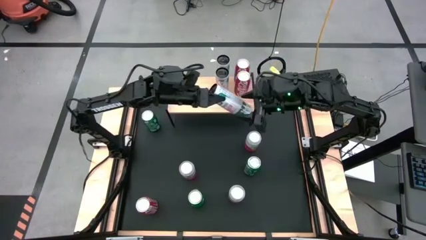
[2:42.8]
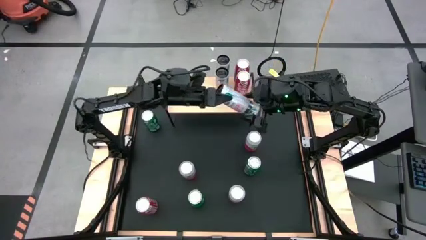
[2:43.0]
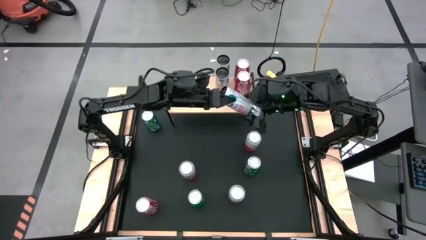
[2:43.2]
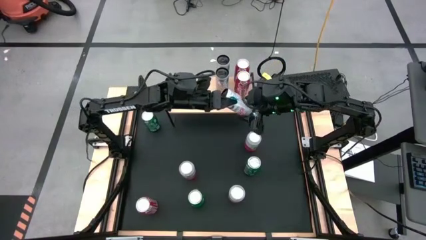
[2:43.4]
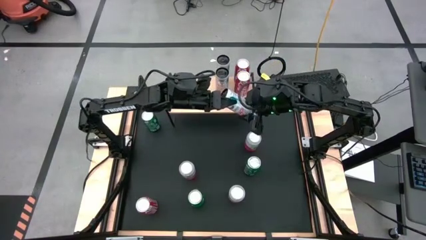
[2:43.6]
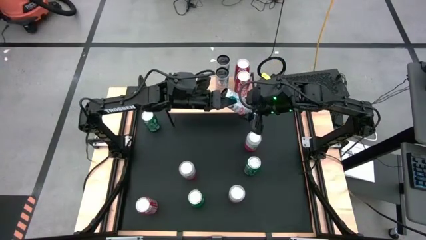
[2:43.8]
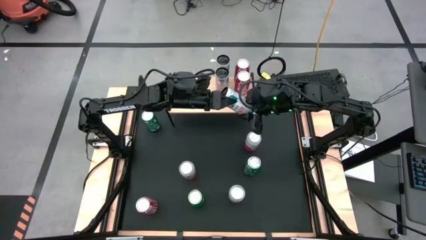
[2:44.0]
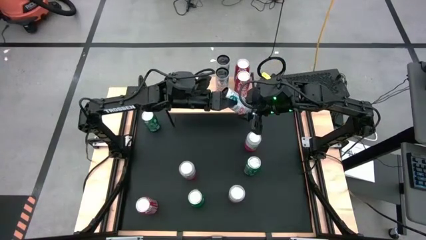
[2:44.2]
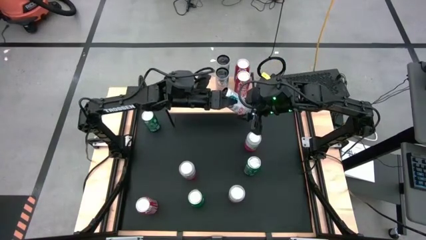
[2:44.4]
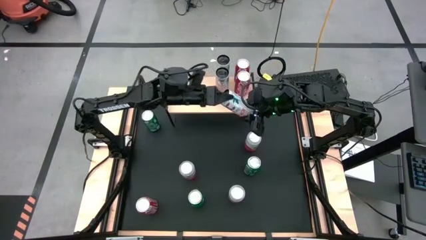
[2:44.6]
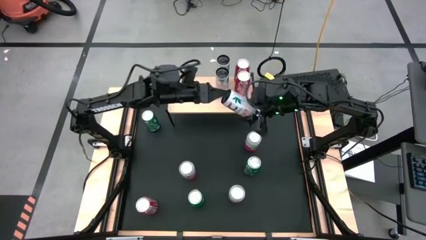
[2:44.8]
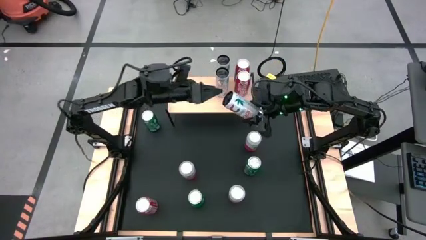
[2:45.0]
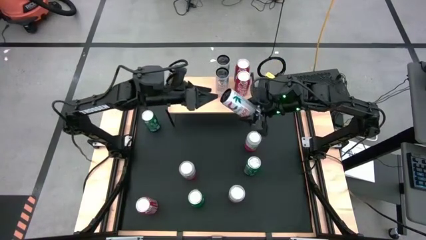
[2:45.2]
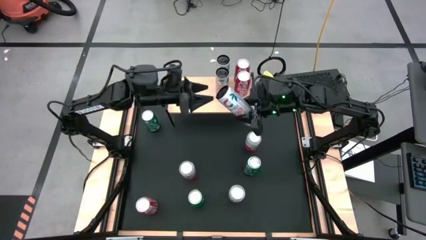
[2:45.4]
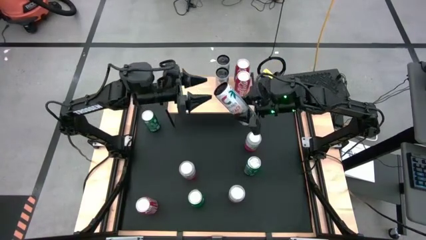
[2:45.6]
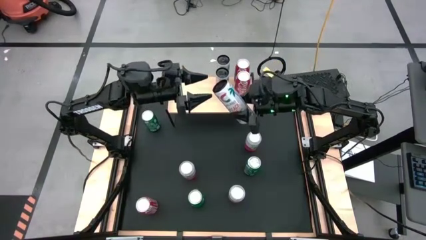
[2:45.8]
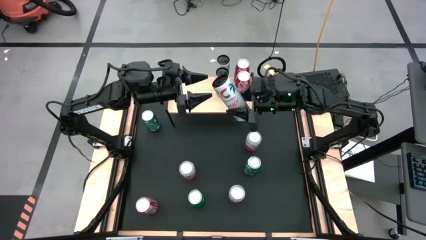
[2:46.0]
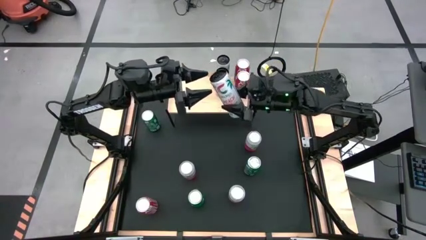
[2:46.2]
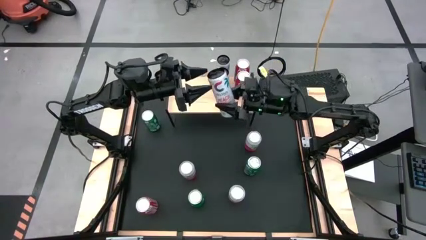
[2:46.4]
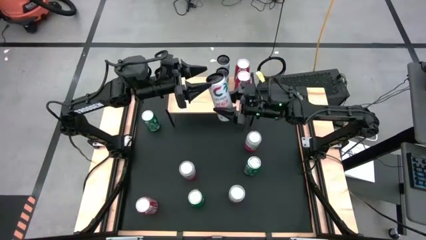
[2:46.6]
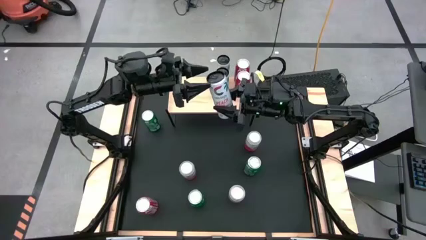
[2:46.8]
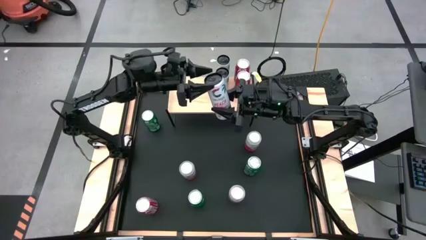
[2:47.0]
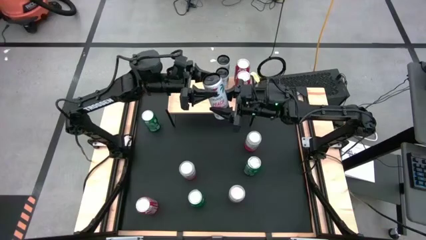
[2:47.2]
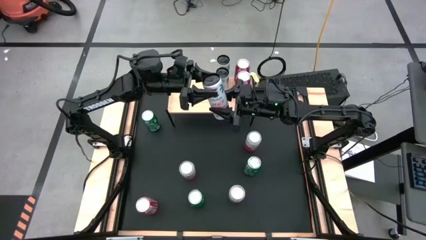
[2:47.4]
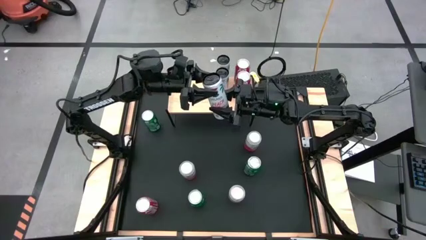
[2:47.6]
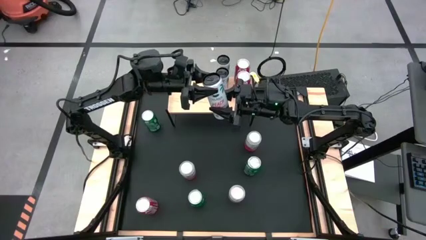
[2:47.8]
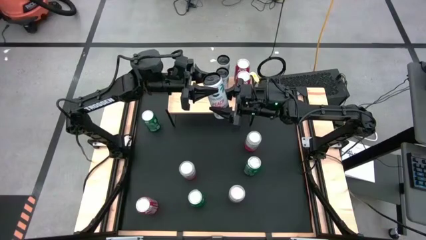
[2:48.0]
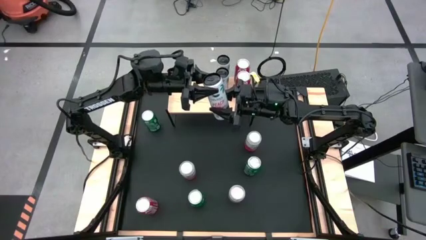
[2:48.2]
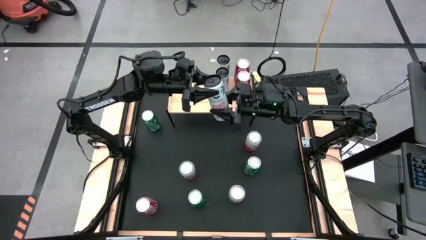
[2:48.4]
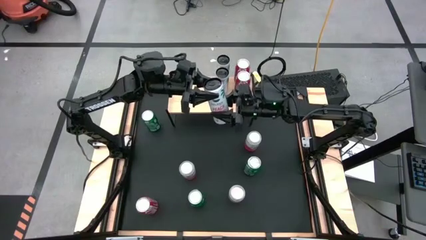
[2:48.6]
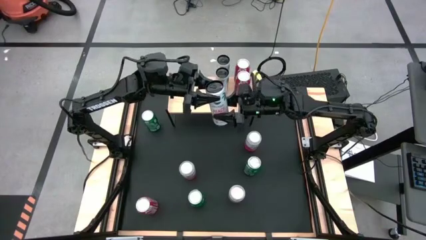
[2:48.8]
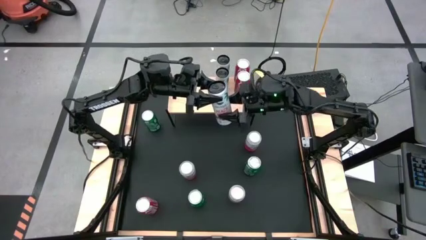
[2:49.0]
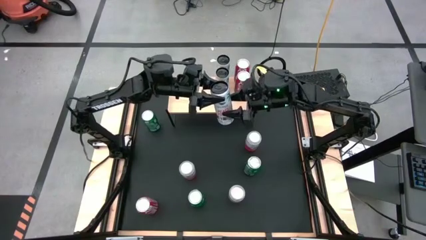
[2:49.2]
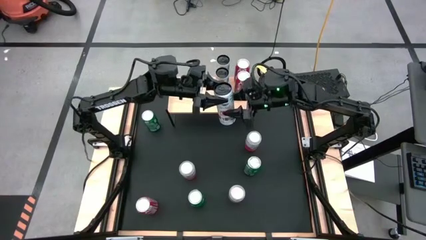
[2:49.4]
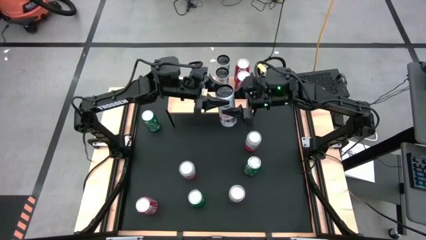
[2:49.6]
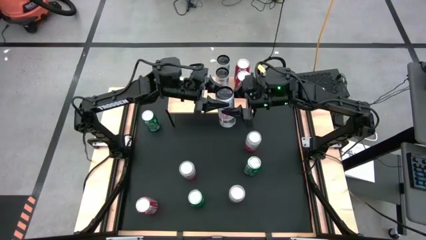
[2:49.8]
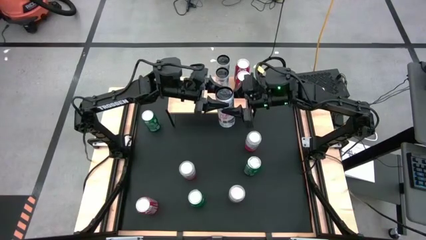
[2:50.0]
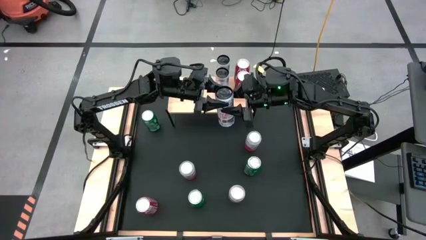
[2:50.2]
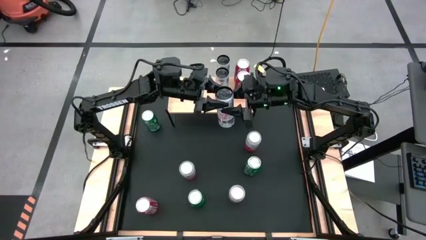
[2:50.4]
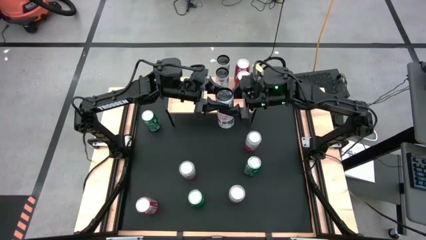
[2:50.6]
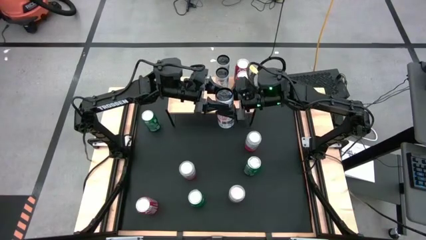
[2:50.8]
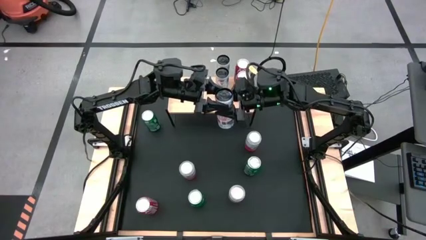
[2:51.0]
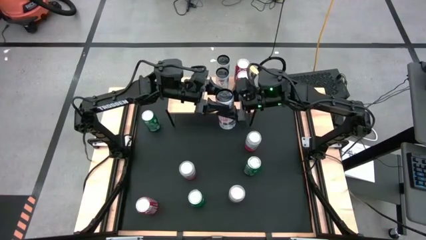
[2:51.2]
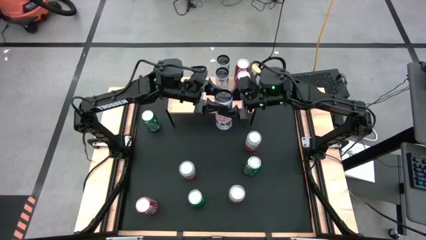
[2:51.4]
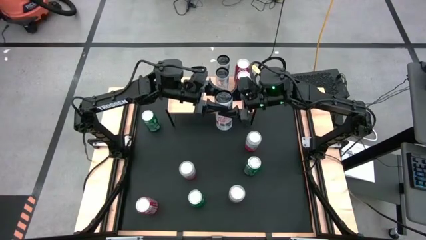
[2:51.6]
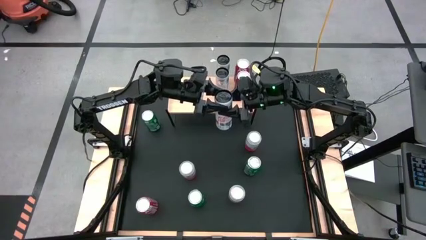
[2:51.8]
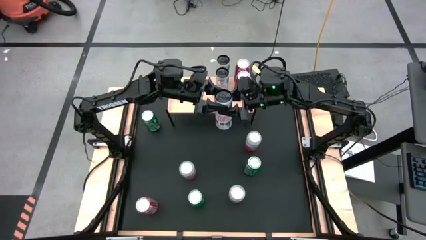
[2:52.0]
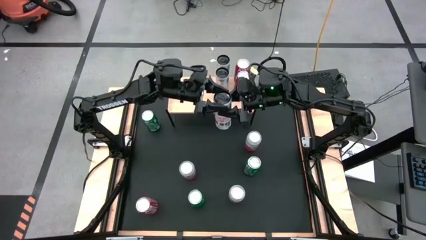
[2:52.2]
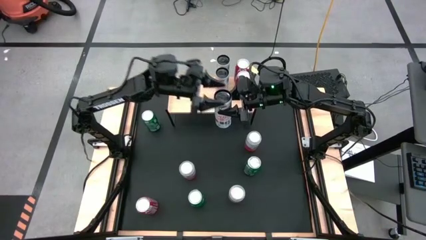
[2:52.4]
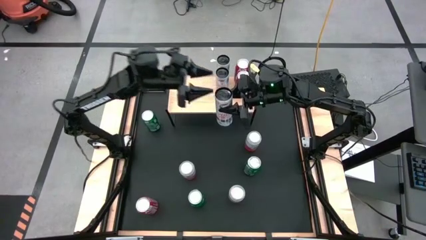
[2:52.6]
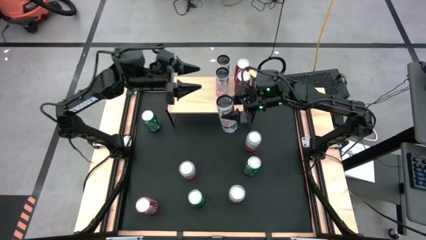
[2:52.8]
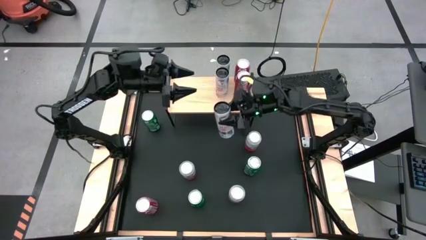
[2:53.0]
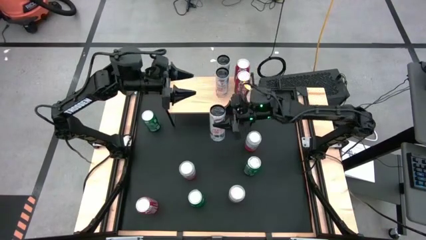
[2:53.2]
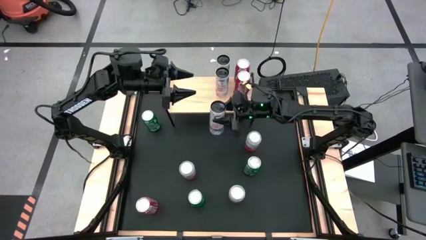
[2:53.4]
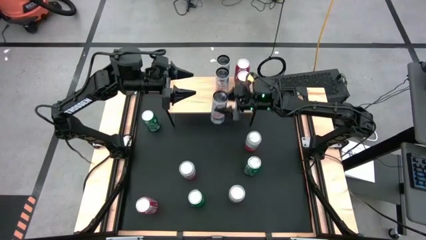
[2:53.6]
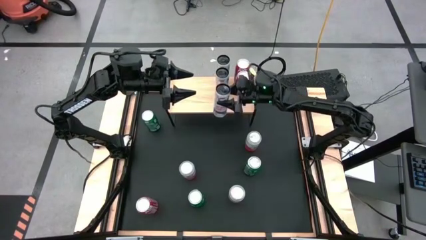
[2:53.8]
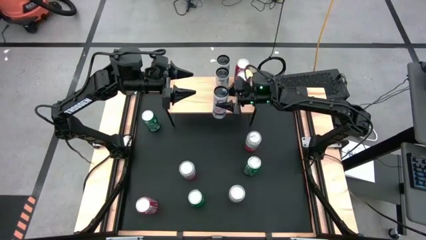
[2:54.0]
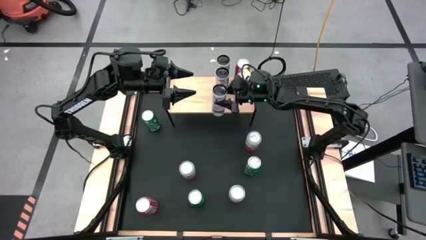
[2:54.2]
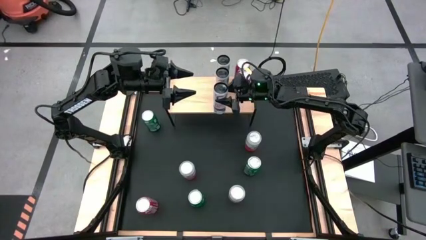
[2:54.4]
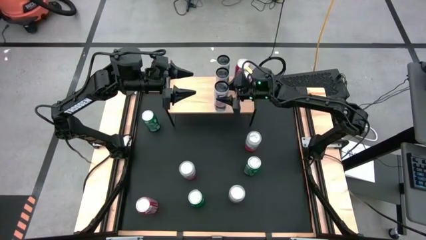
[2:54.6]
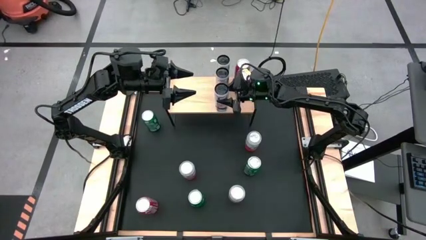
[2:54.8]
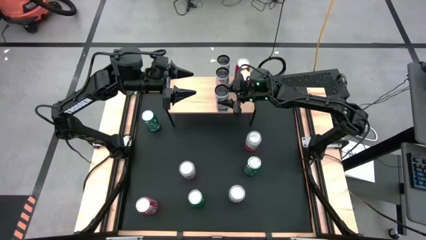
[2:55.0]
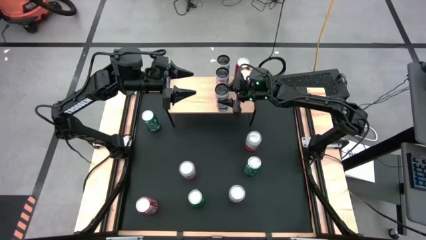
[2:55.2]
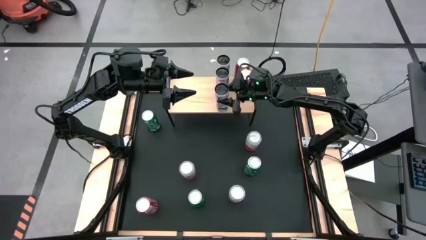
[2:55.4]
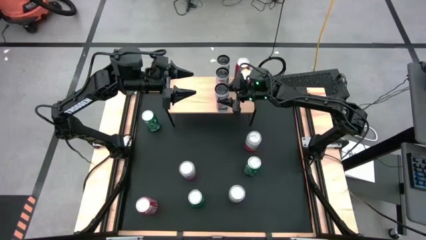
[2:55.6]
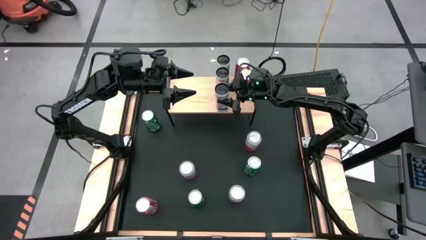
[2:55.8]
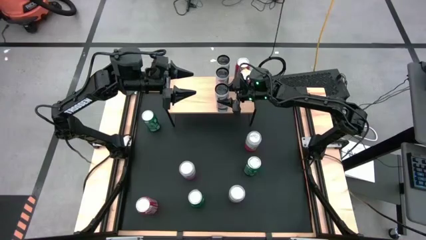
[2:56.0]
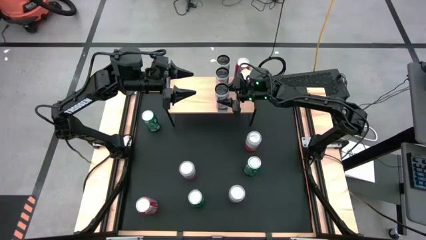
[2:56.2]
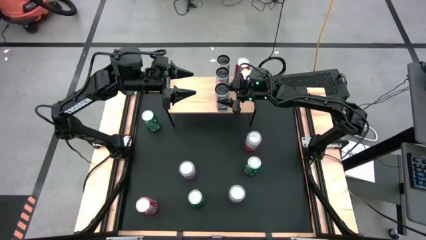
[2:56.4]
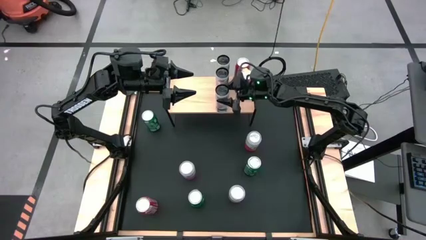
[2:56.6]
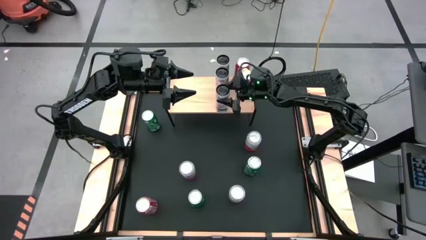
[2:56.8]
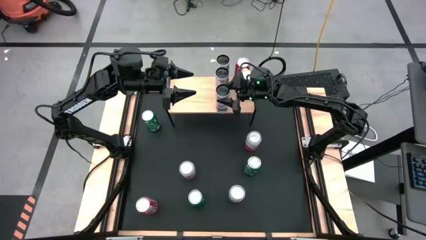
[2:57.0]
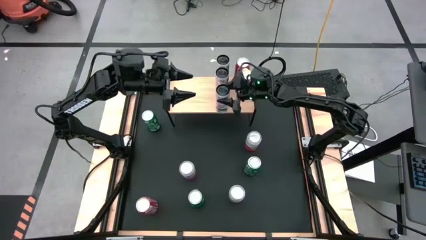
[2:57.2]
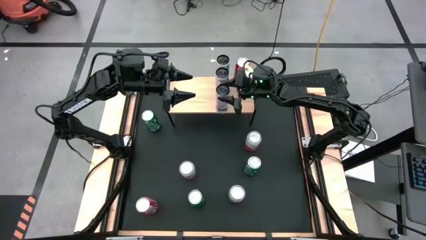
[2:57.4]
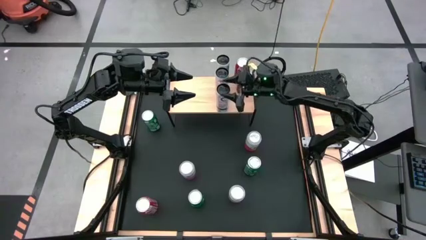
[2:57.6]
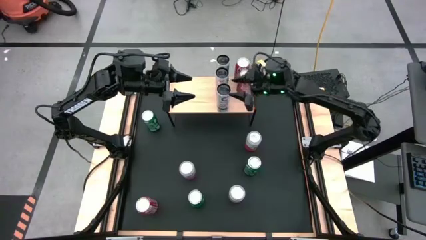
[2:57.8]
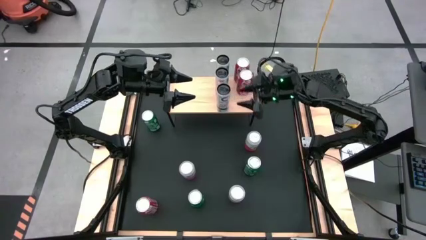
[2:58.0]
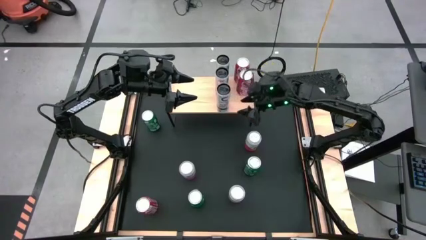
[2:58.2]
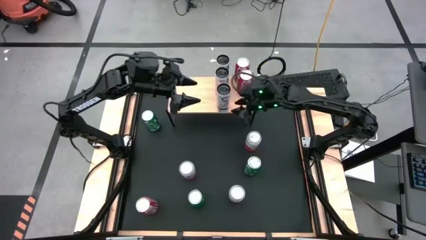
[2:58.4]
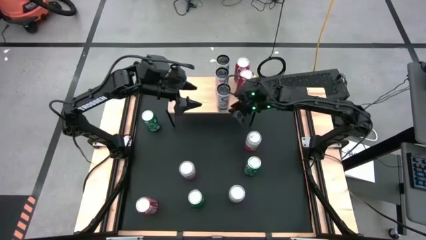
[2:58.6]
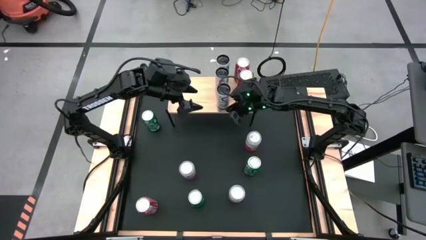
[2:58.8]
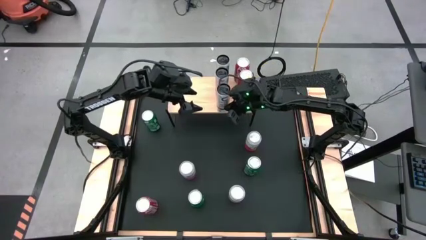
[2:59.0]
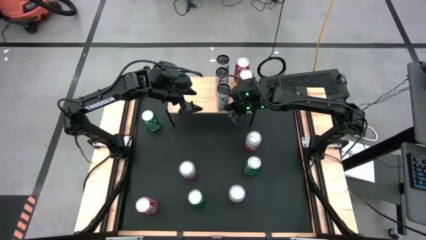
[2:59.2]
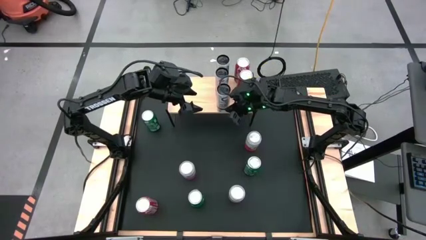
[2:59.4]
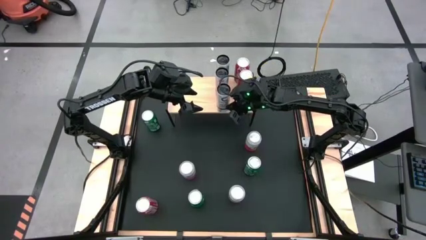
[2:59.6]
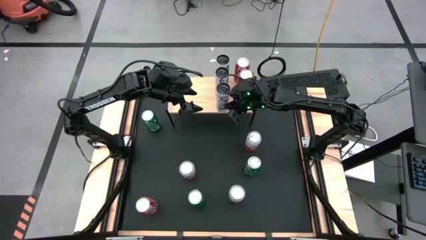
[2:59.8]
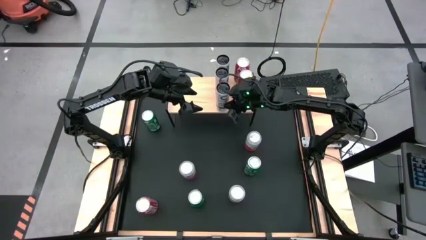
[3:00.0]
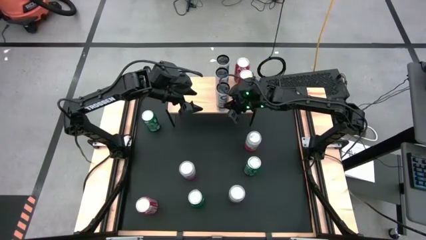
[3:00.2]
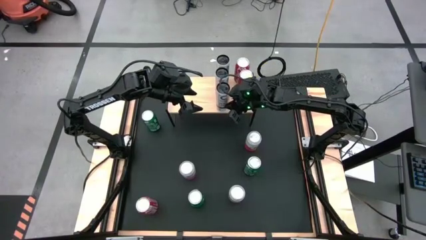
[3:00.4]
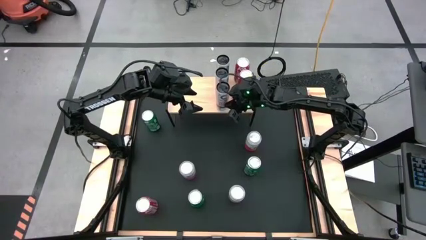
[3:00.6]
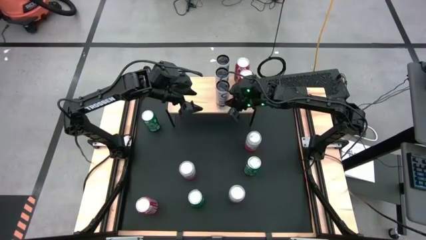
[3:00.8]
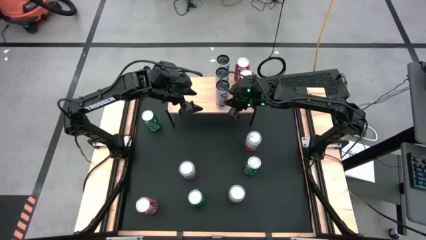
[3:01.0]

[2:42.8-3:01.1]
Task: Place canned beverage on shelf
Put the white pink soda can aligned with the other white pink soda cans on the shelf
